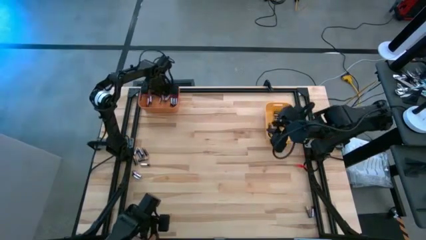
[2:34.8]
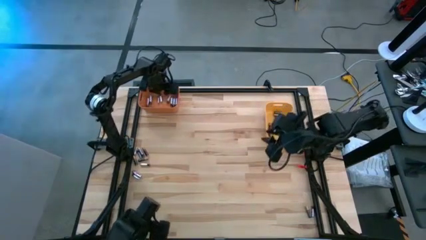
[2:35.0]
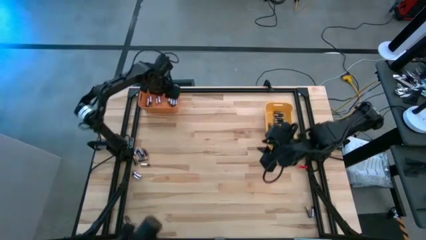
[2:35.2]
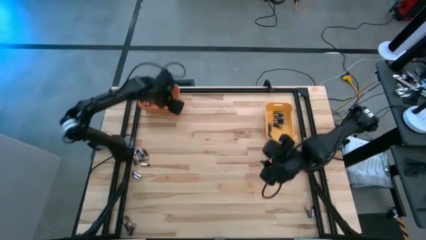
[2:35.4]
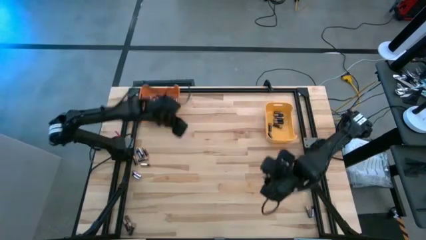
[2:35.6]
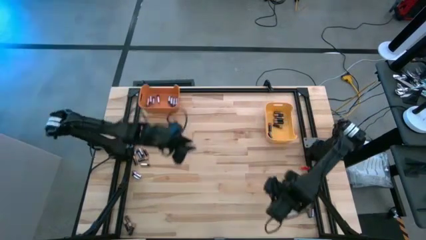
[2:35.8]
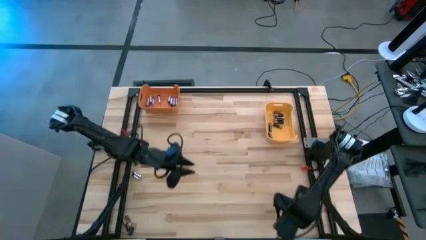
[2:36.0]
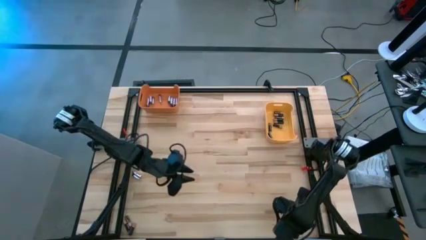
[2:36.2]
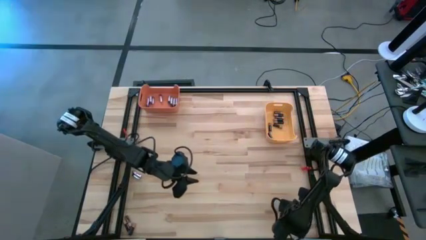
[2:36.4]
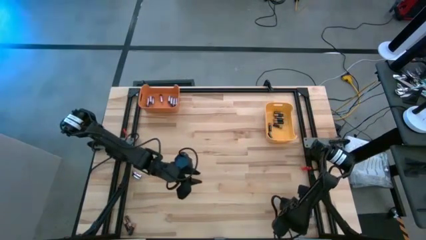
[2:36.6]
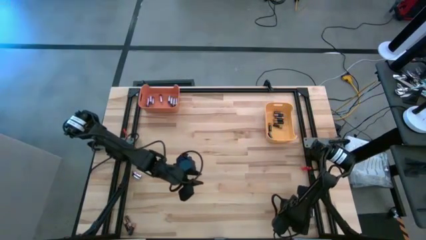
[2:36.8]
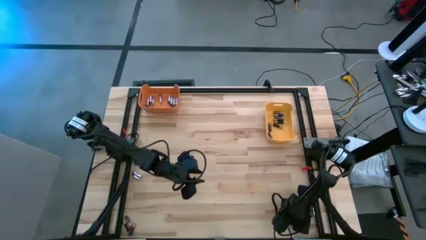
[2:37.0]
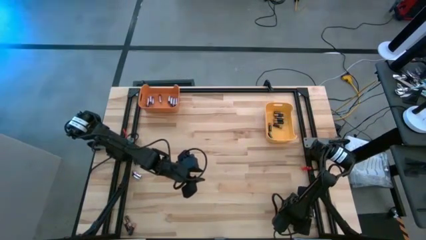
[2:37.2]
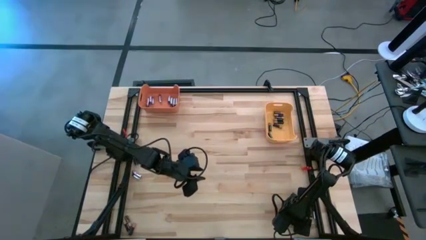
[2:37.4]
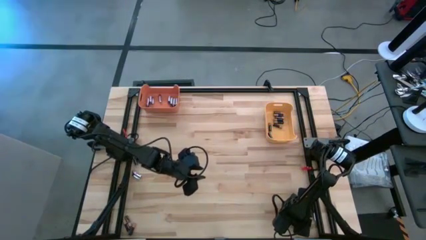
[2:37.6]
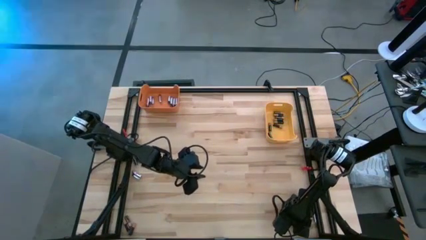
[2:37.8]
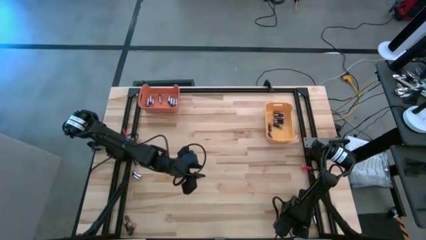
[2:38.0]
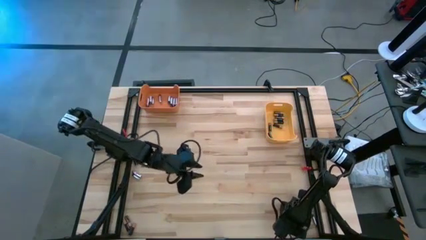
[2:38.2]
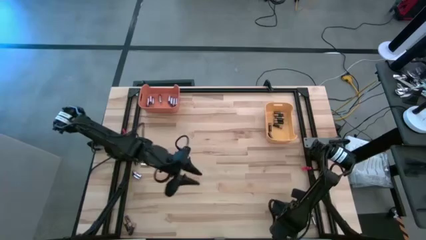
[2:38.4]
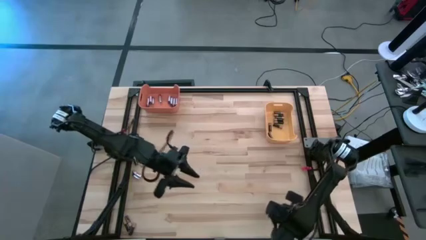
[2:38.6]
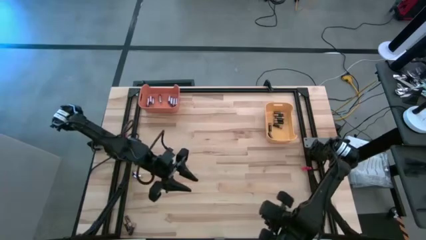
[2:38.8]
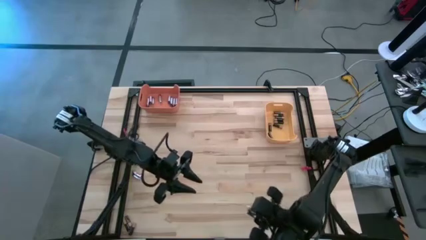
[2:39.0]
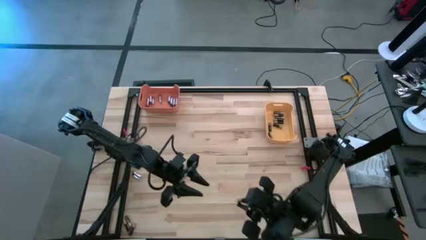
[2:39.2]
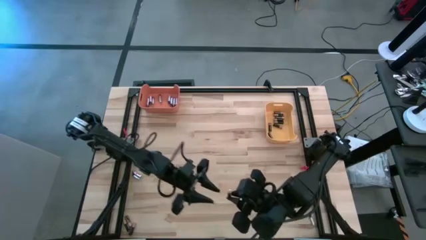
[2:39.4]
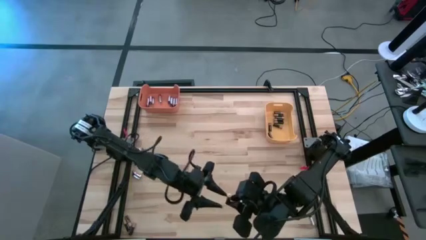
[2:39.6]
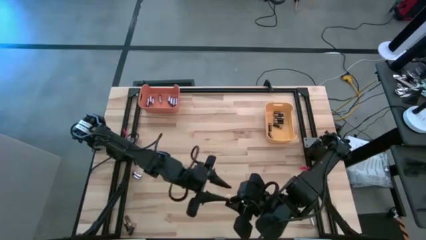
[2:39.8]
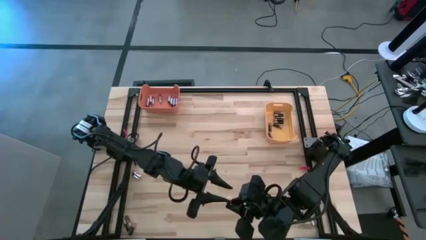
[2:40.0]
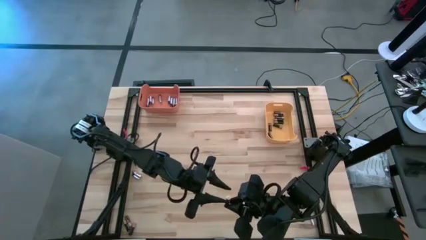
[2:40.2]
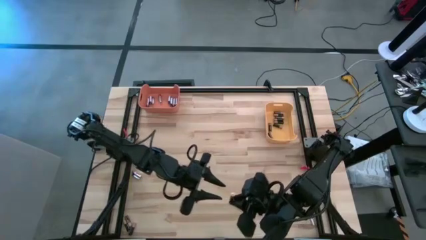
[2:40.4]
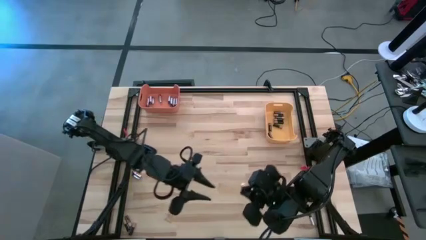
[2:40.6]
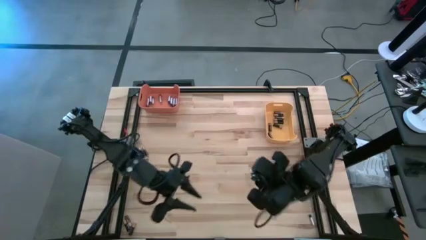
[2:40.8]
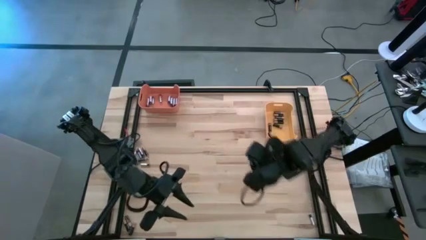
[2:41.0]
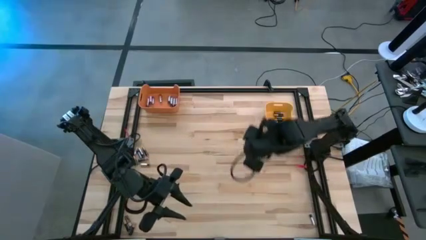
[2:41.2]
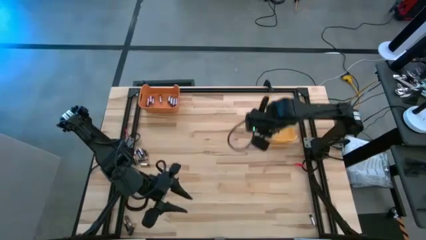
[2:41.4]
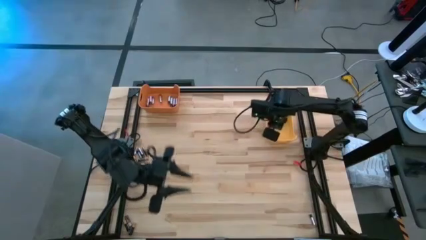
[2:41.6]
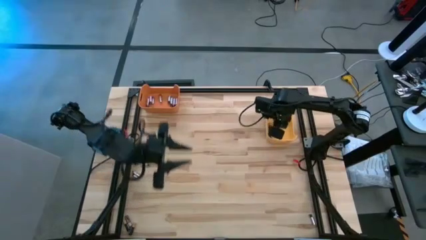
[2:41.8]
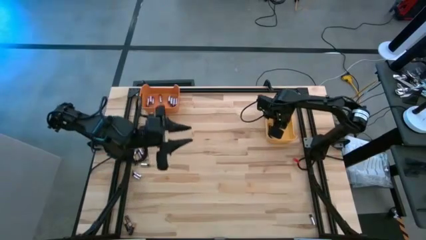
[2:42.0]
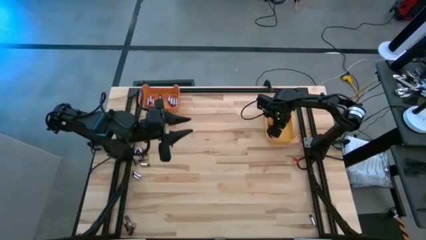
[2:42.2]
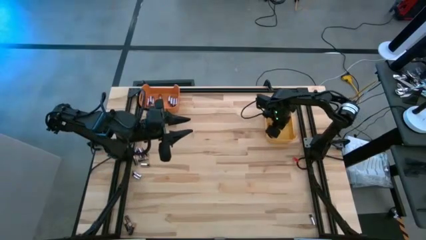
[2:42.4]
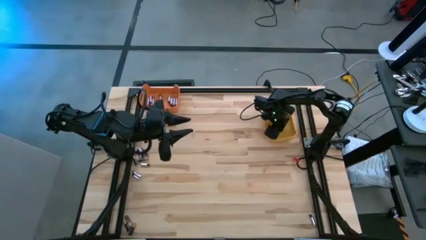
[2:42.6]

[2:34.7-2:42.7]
Task: Sort batteries
Put the black battery into the yellow bin

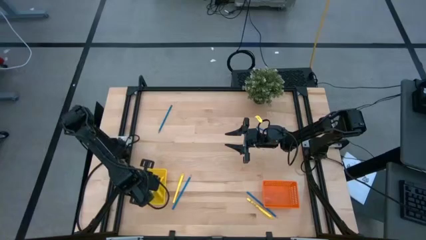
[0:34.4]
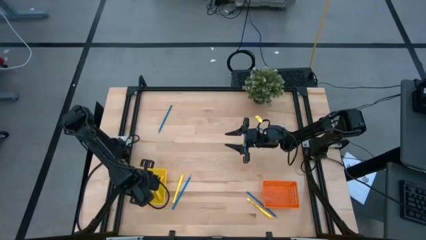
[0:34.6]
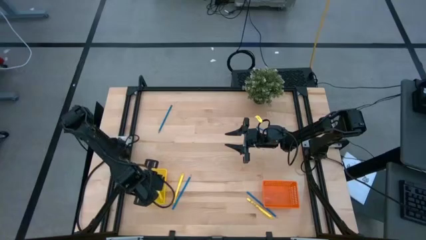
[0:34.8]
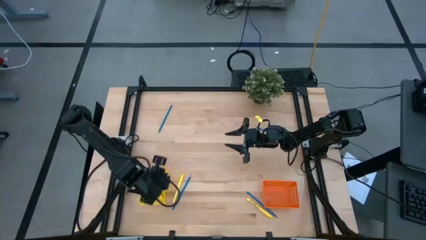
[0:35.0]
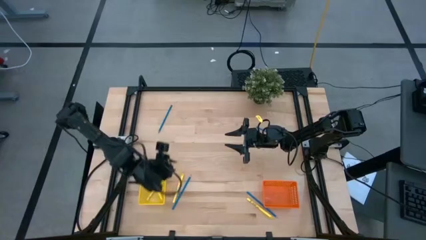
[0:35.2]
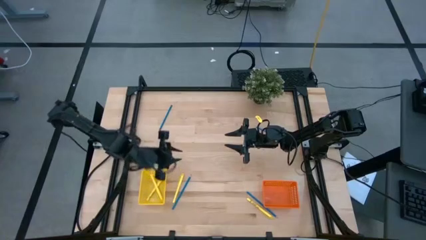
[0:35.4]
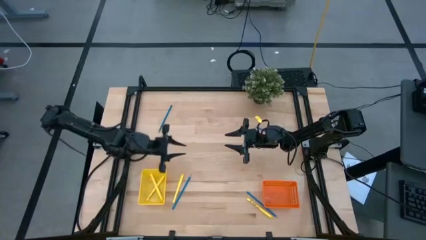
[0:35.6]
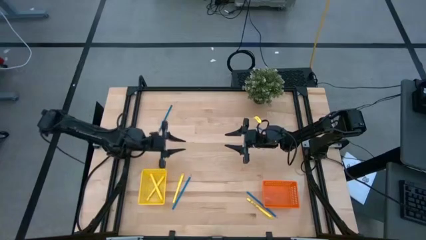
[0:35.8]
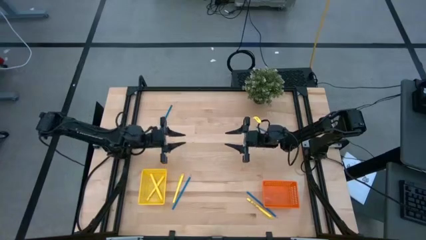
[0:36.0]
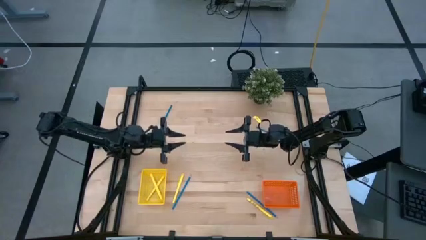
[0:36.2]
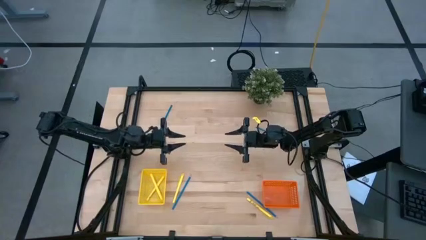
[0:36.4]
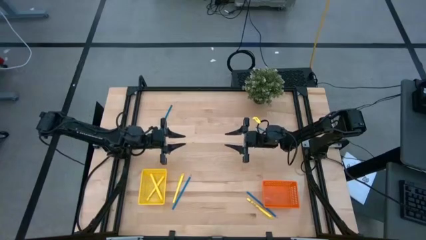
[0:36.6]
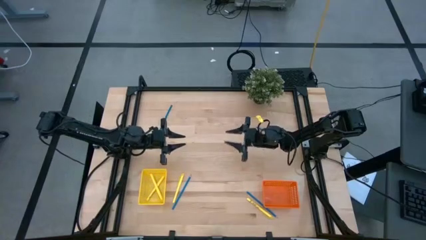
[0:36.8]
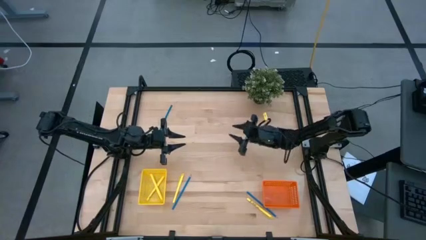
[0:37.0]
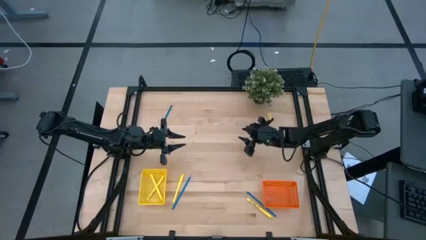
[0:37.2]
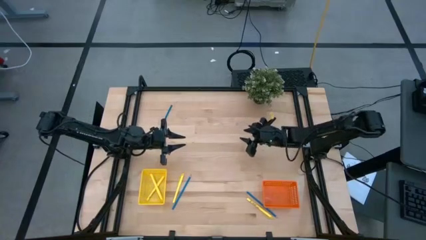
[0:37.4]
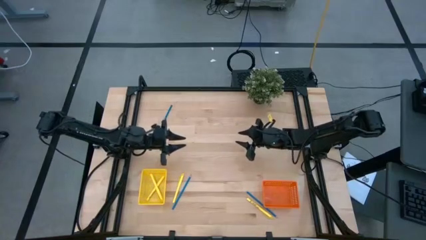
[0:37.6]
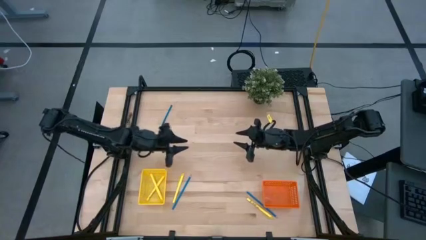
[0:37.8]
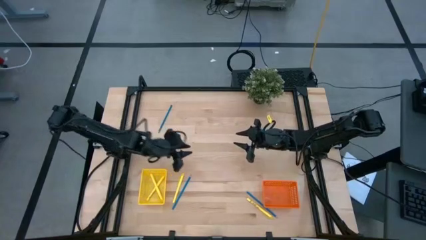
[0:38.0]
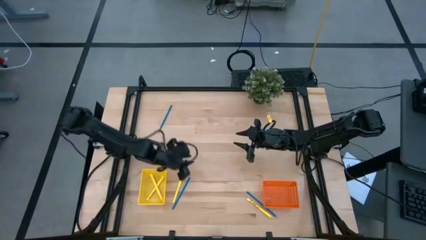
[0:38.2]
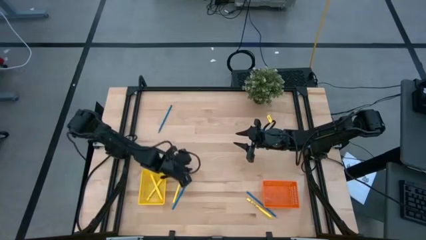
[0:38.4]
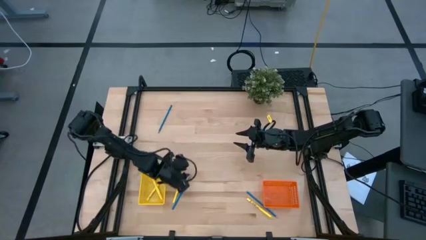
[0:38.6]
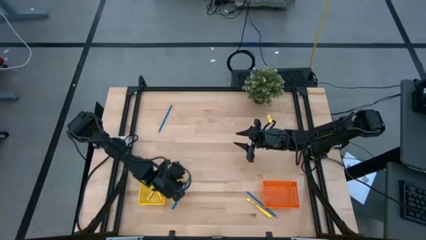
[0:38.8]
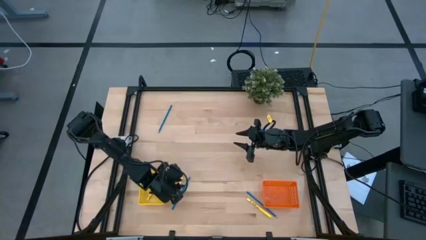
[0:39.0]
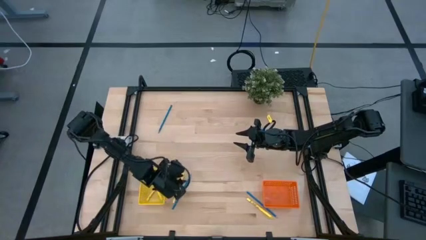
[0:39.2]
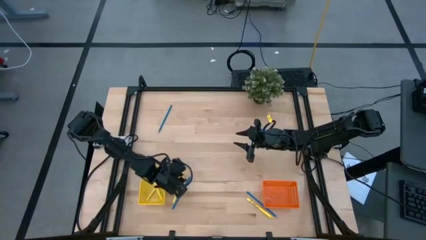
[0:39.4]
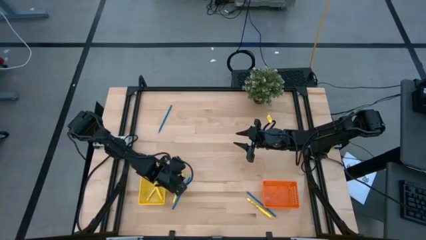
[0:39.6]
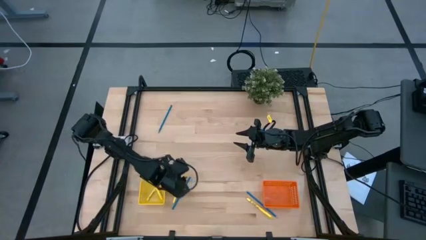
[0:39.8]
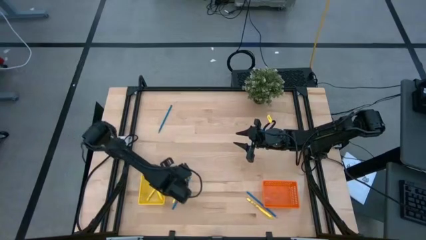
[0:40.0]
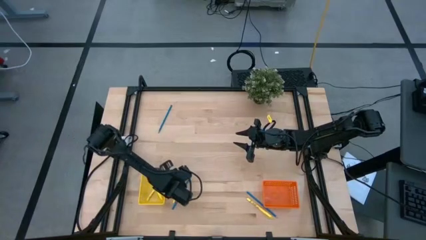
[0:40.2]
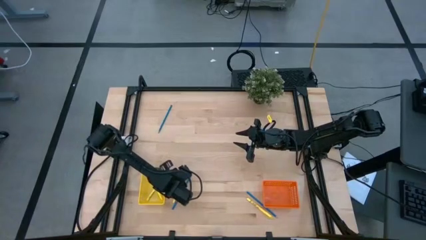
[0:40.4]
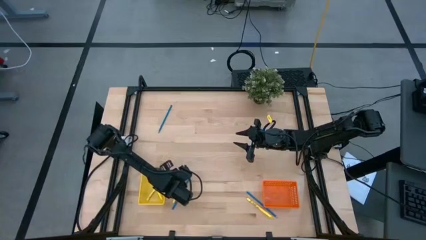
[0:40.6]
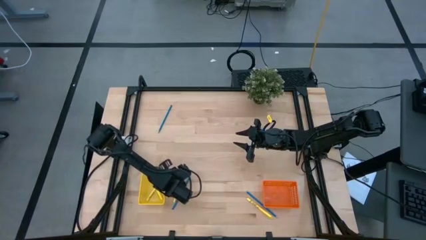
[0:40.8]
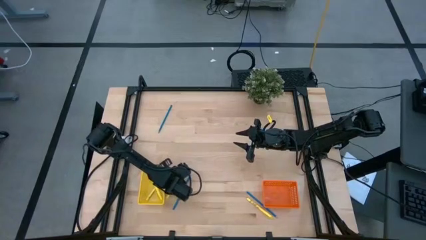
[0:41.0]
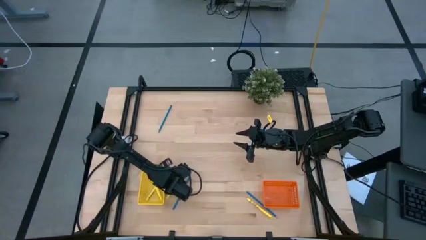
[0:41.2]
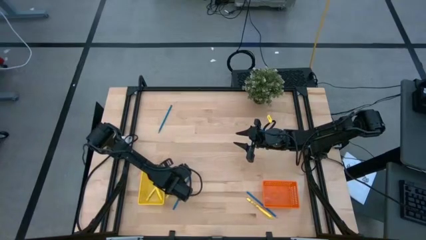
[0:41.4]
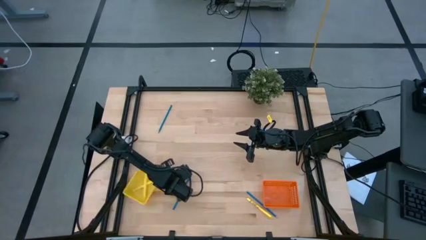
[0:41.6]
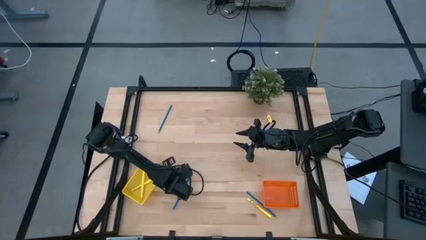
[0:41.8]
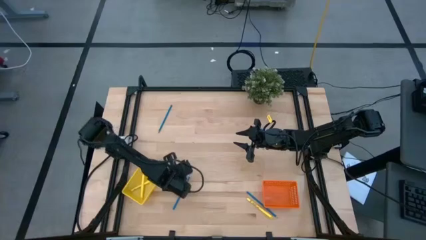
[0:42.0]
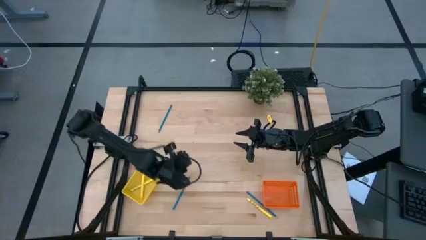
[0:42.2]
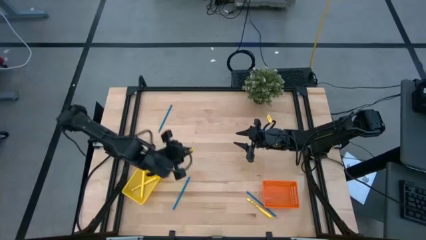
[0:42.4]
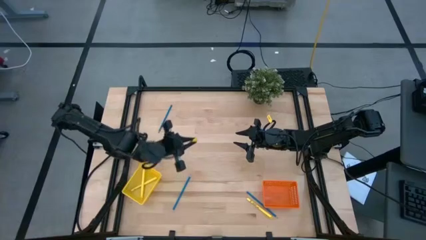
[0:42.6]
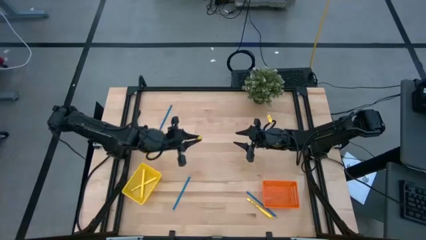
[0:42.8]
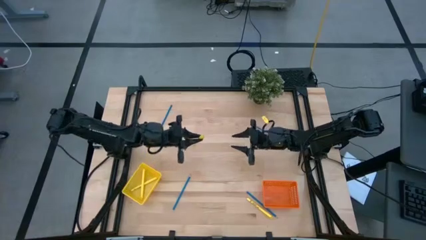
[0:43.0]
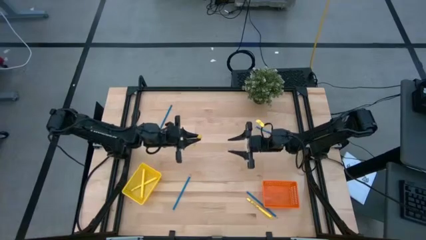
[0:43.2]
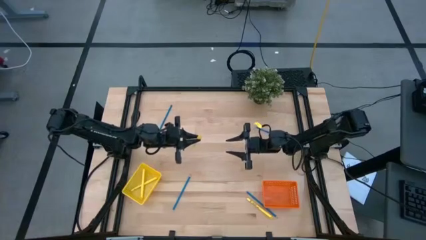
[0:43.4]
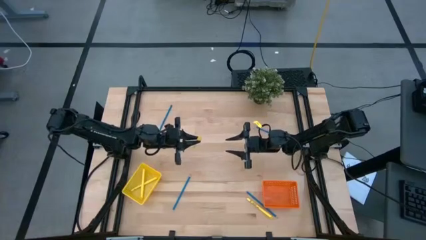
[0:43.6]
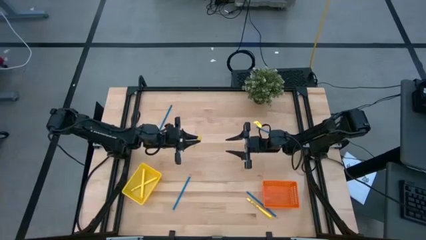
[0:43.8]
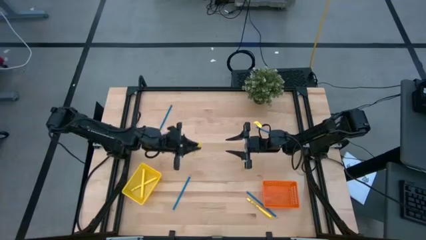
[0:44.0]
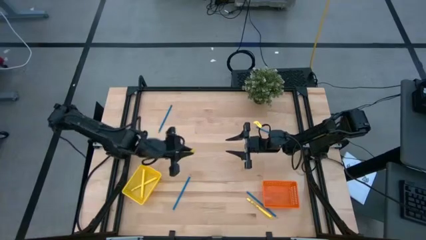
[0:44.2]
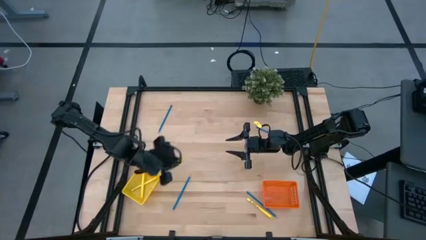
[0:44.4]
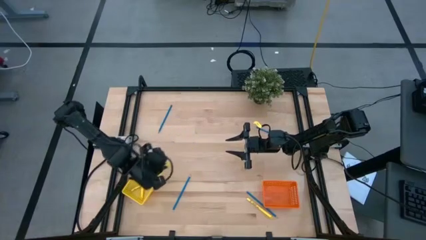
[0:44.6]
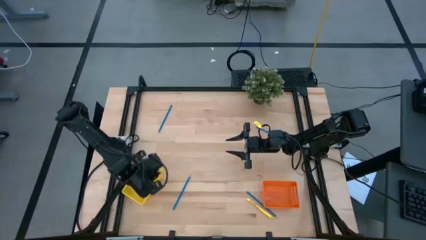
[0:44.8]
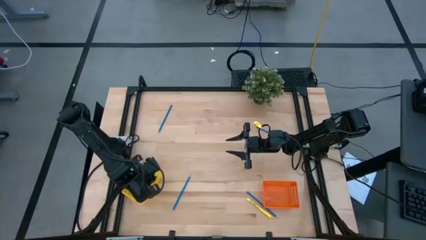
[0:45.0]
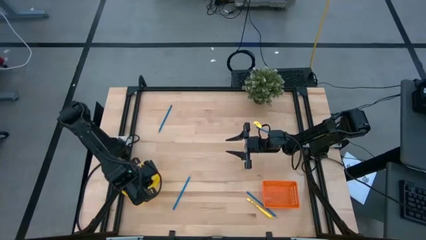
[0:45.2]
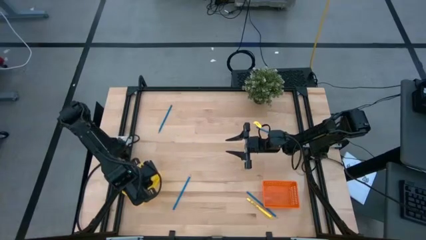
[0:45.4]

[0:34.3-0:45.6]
Task: Sort pens & pencils
Put the left yellow pen into the yellow basket
